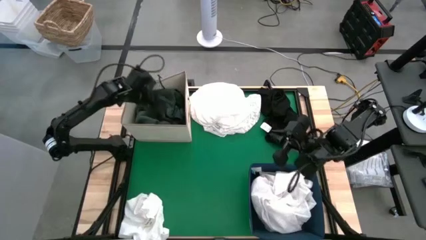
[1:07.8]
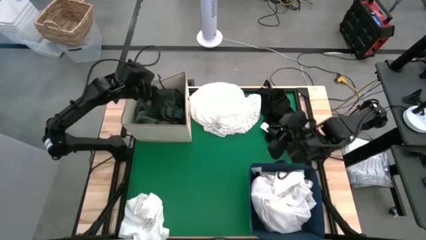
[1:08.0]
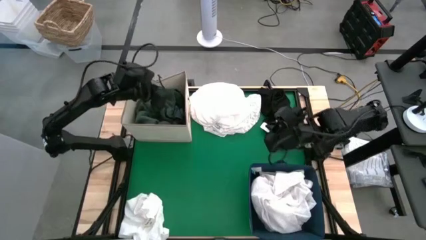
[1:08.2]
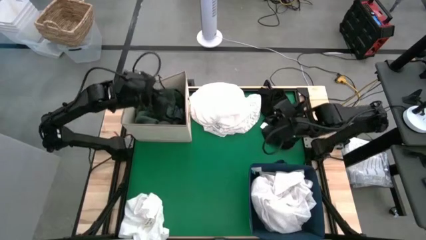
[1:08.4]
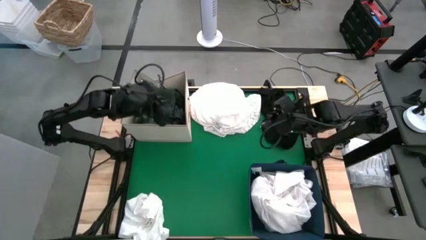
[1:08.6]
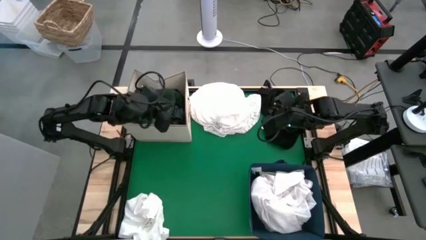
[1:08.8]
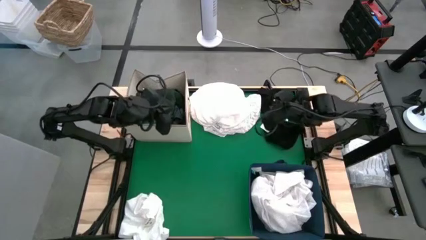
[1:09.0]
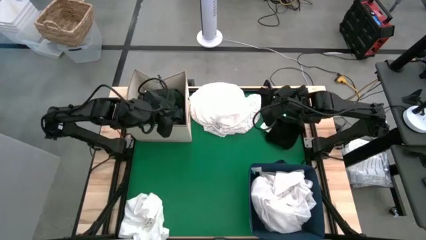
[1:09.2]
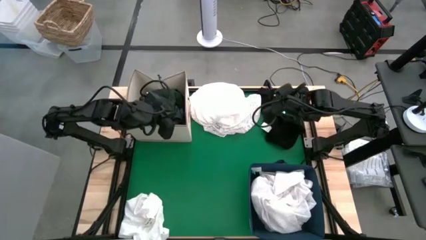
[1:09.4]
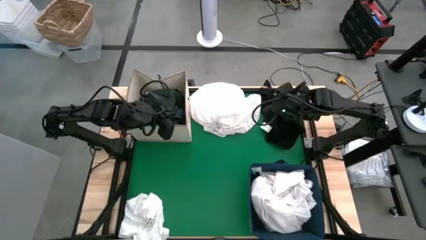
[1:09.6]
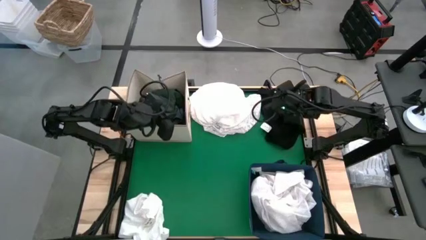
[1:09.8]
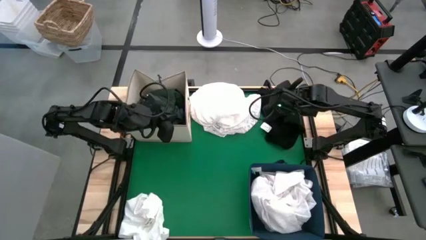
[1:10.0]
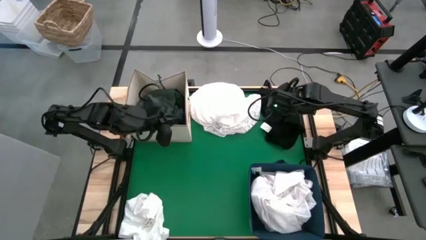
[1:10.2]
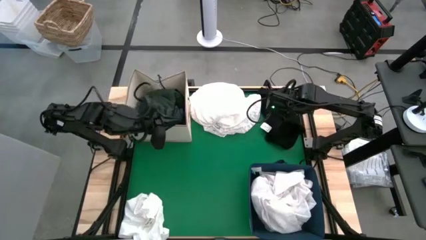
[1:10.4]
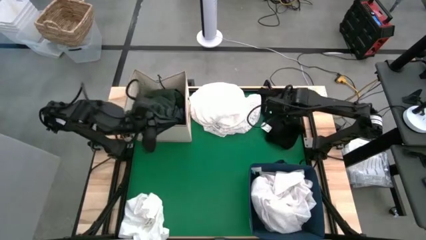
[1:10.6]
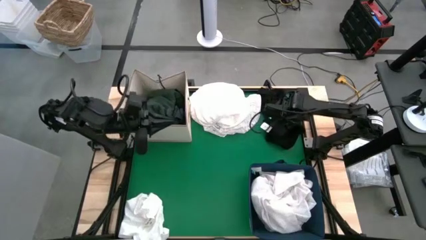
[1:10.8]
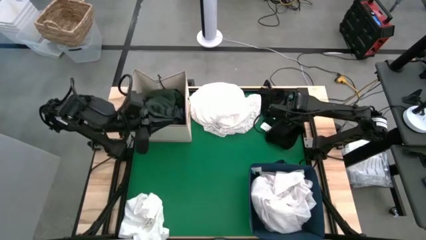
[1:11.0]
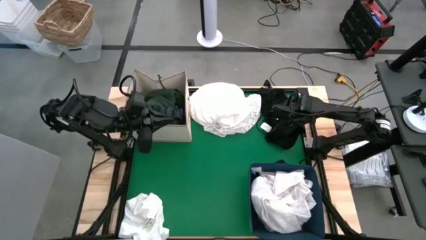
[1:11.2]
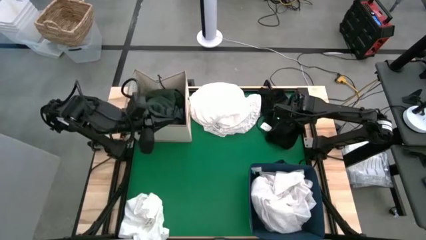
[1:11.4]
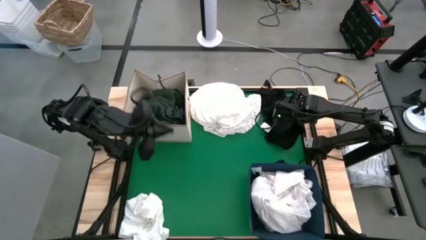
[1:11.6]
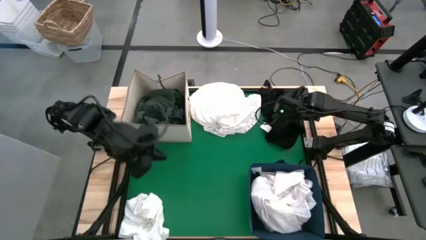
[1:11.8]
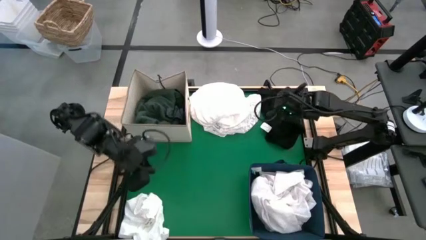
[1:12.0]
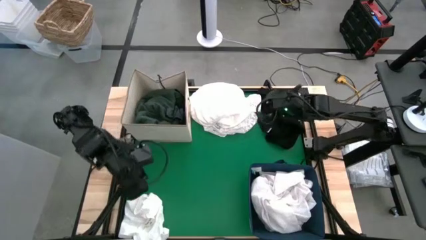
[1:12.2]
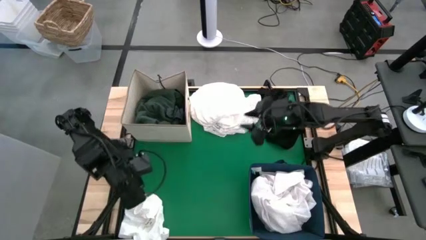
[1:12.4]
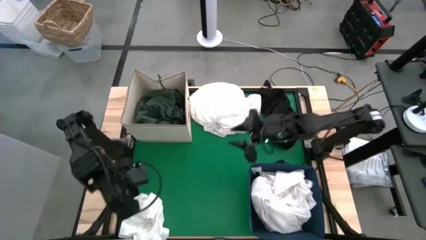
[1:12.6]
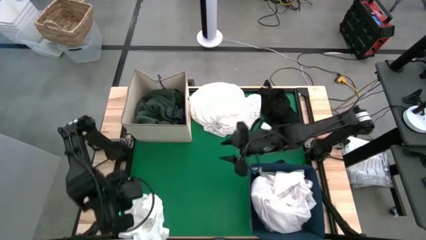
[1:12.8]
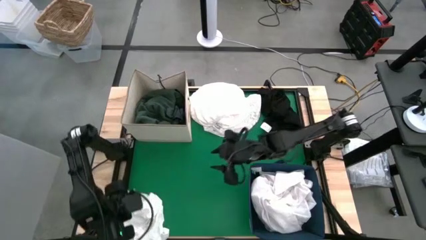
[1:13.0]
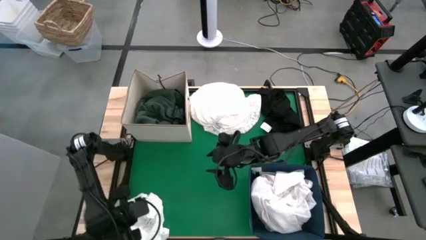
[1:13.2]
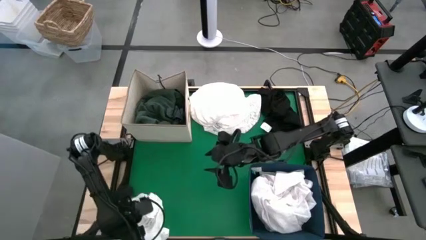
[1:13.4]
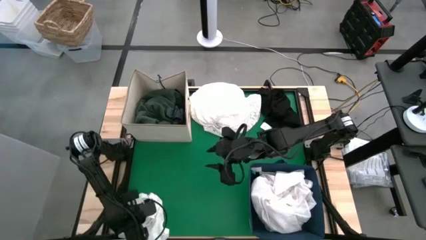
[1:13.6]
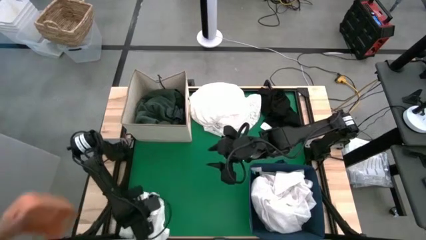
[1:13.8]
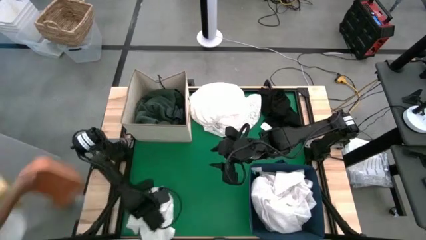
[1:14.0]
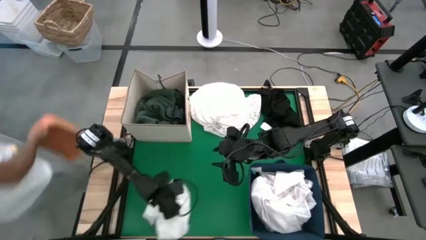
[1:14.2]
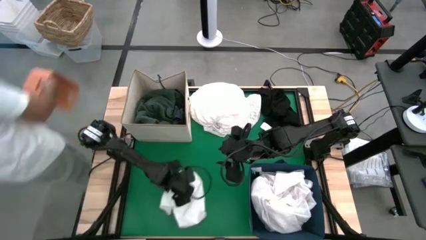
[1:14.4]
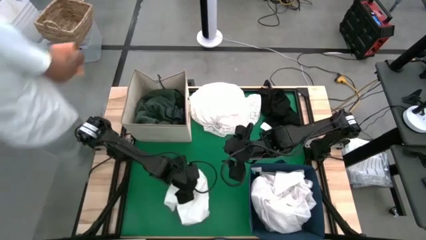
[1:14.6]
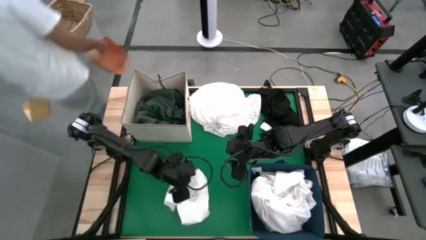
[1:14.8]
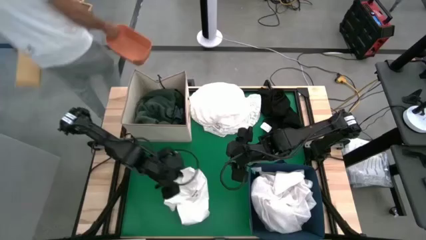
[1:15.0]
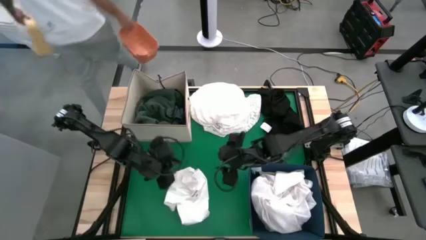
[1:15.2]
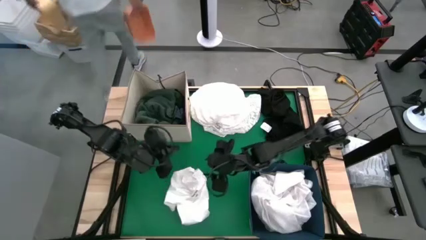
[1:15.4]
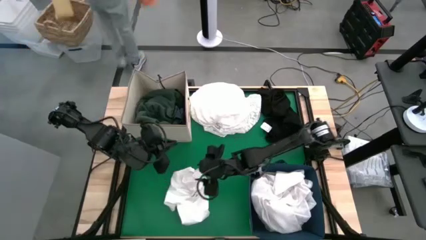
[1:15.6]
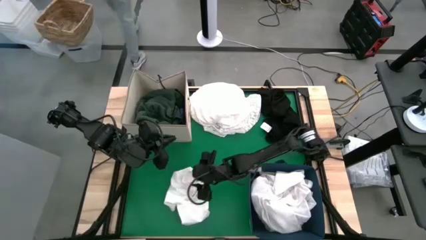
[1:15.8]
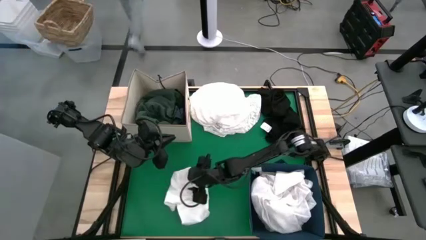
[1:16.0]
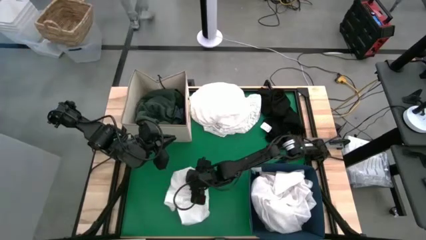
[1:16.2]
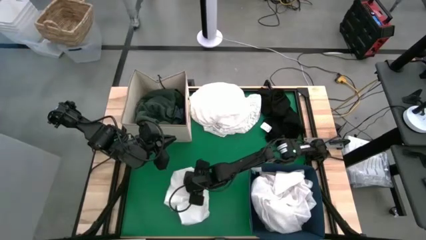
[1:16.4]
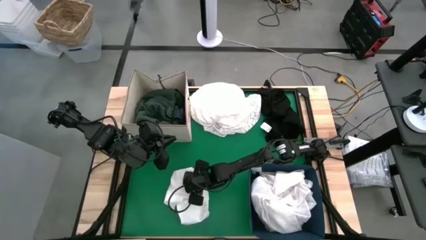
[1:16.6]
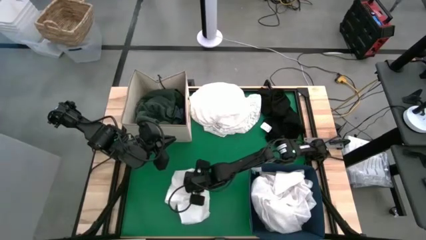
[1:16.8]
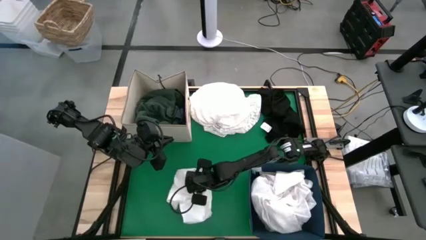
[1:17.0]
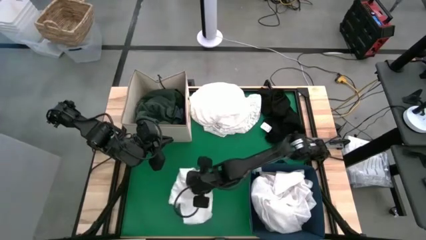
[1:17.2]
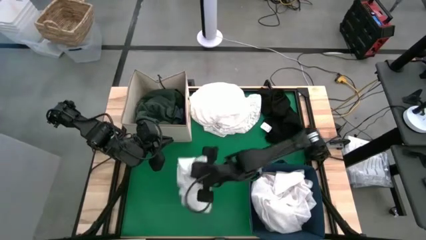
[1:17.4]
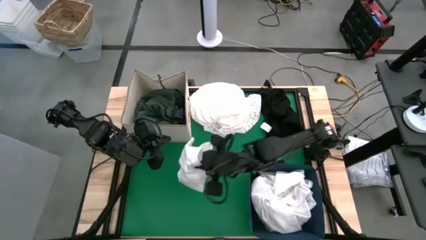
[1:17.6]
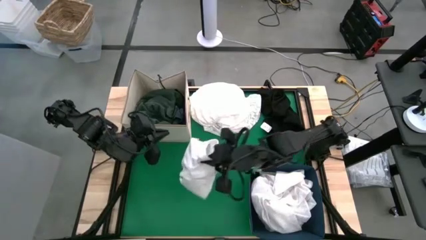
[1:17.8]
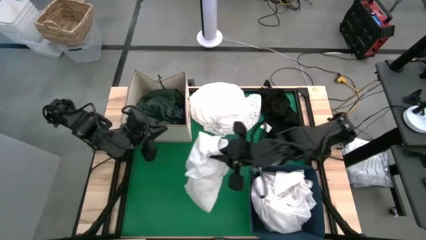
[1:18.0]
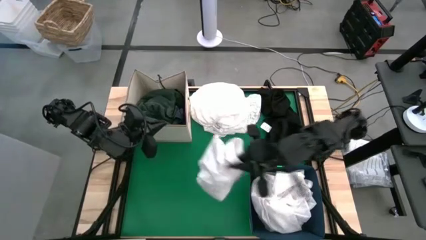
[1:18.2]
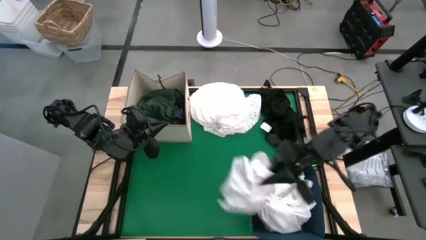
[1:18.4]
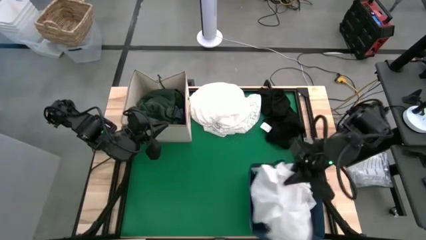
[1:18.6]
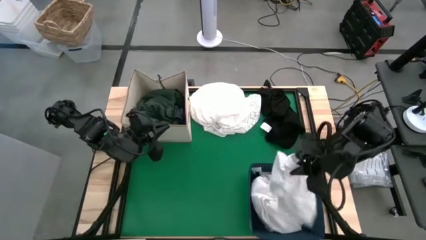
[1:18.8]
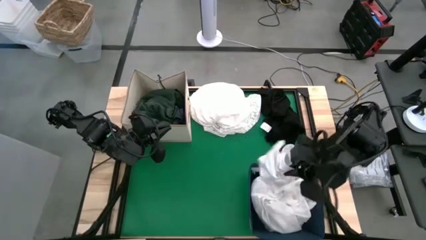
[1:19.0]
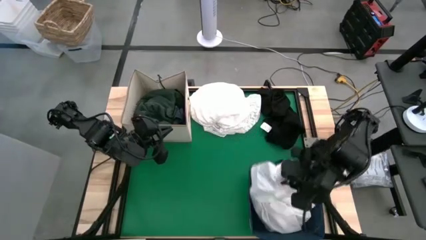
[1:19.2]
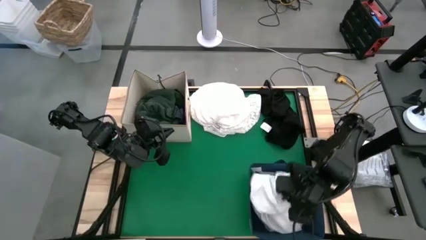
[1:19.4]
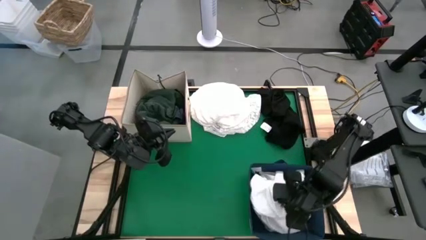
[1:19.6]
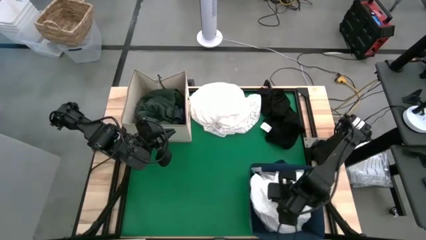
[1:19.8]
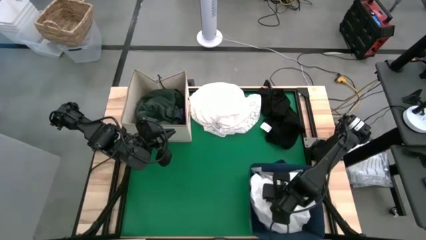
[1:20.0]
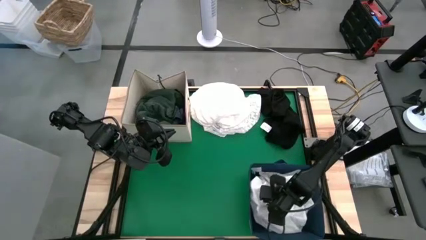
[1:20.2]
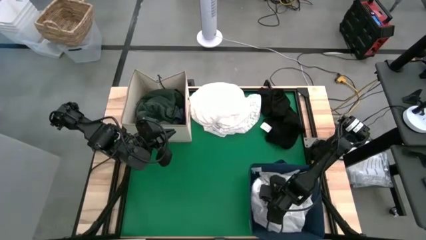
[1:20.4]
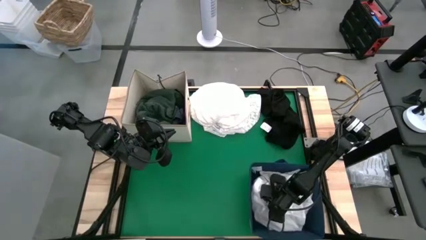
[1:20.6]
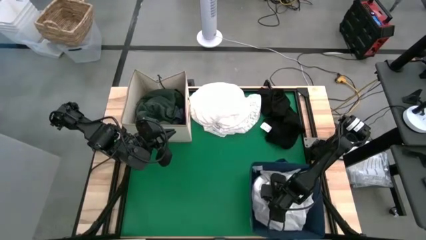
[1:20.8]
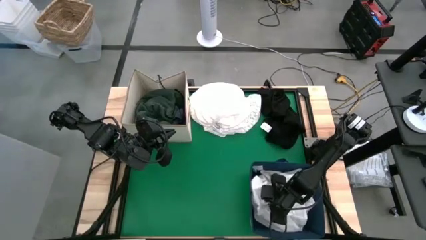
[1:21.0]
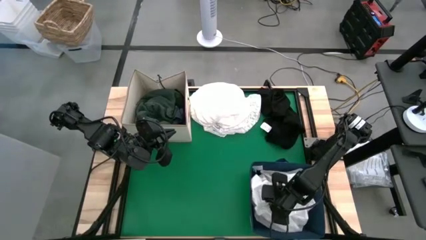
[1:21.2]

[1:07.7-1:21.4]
Put the bottom white cloth into the blue bin
